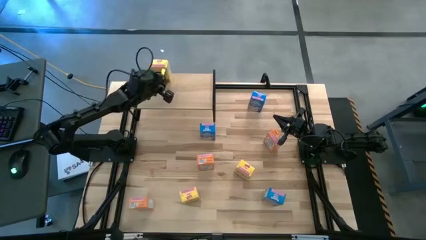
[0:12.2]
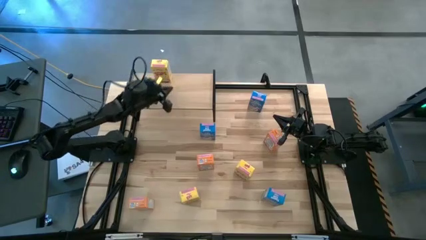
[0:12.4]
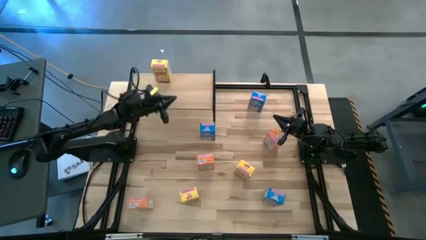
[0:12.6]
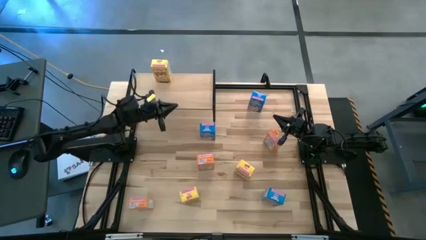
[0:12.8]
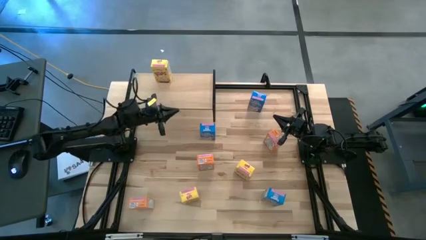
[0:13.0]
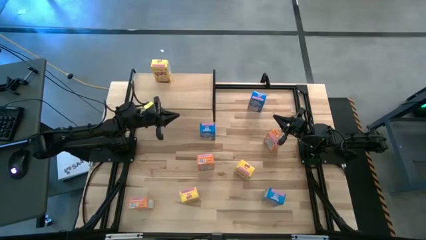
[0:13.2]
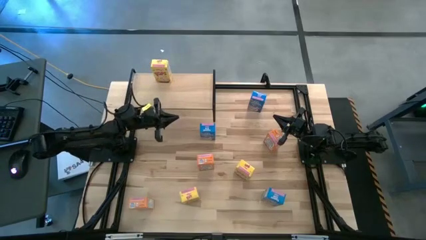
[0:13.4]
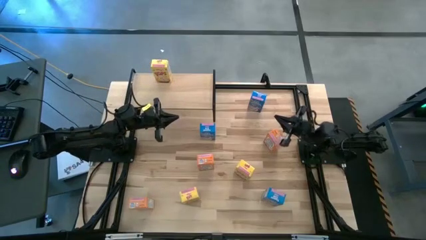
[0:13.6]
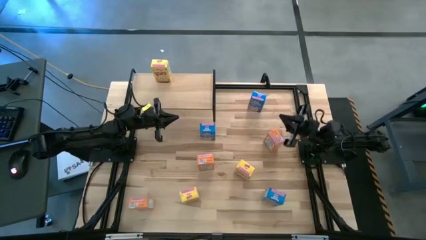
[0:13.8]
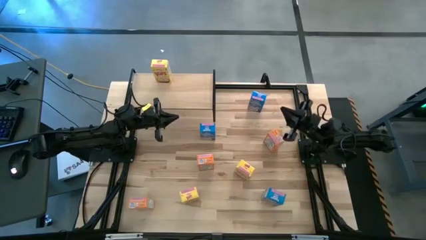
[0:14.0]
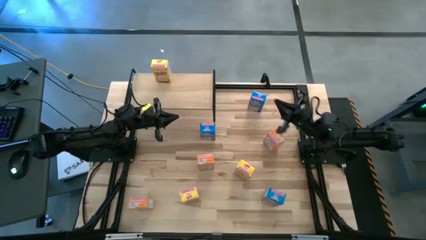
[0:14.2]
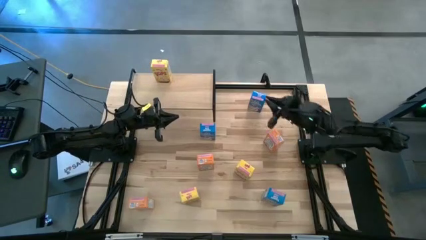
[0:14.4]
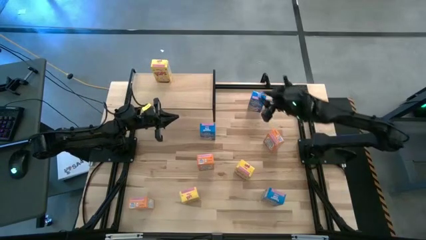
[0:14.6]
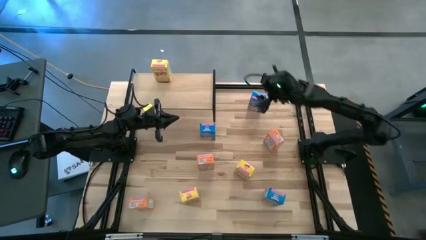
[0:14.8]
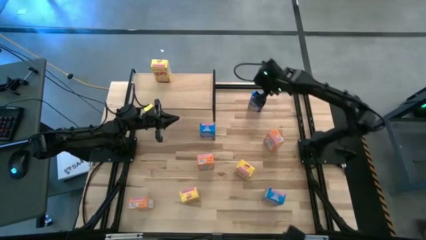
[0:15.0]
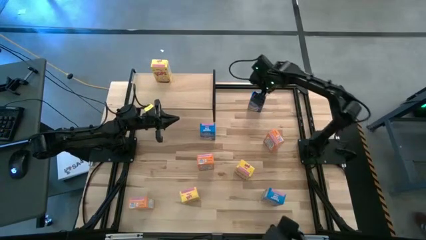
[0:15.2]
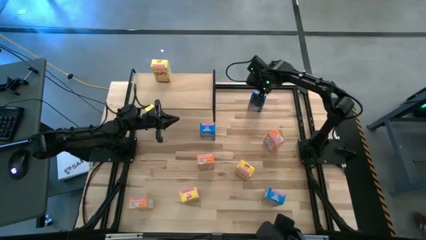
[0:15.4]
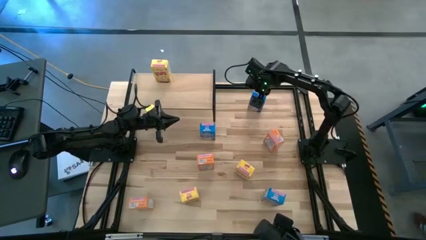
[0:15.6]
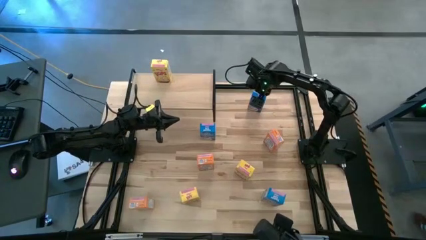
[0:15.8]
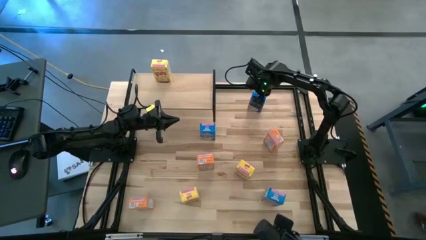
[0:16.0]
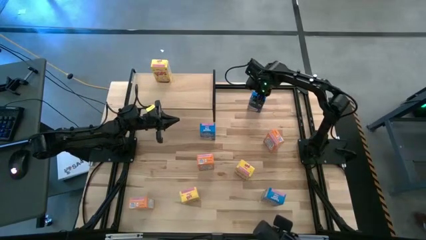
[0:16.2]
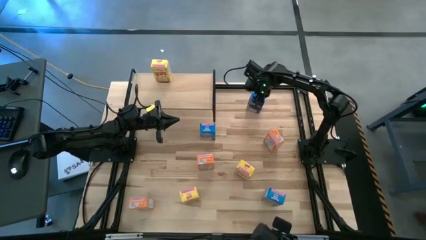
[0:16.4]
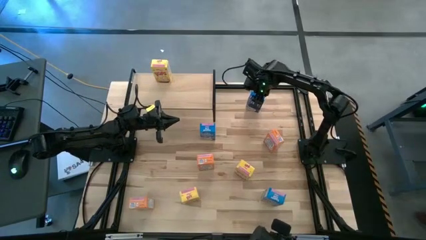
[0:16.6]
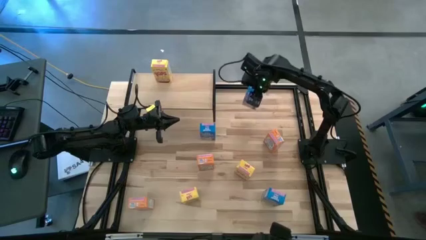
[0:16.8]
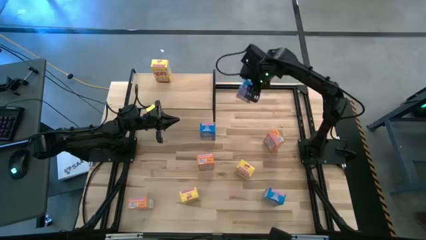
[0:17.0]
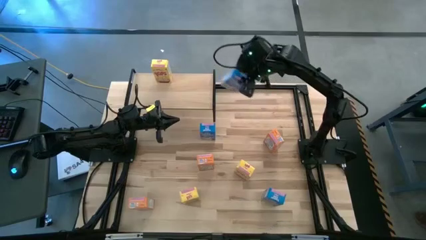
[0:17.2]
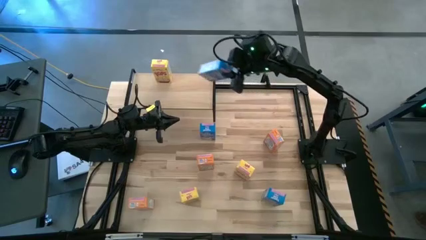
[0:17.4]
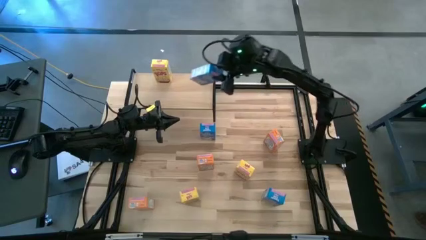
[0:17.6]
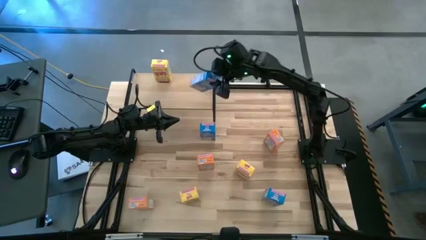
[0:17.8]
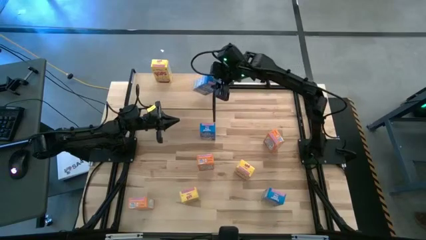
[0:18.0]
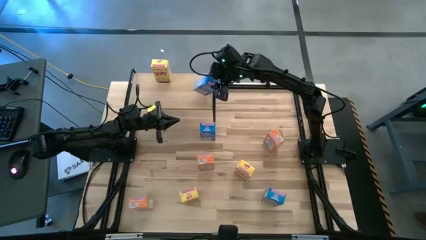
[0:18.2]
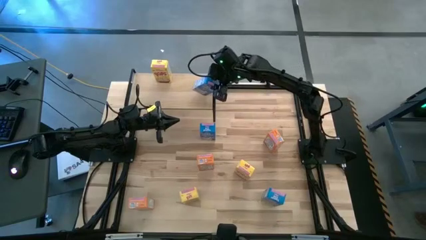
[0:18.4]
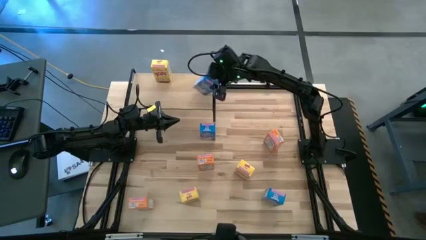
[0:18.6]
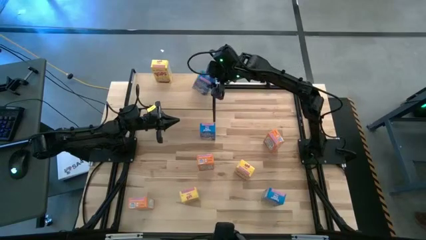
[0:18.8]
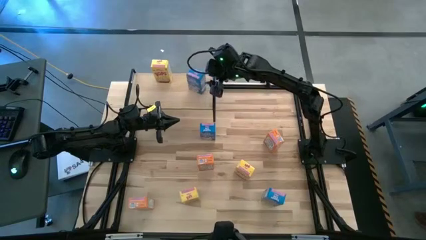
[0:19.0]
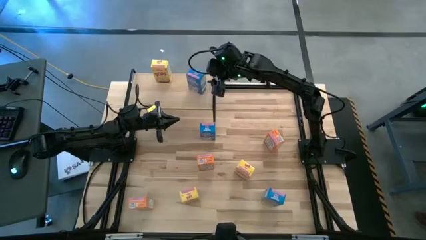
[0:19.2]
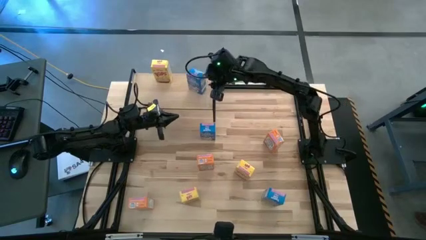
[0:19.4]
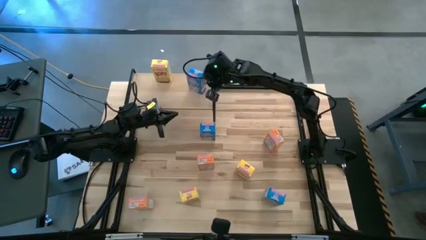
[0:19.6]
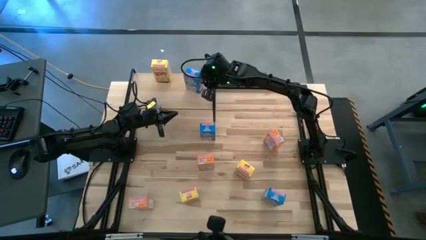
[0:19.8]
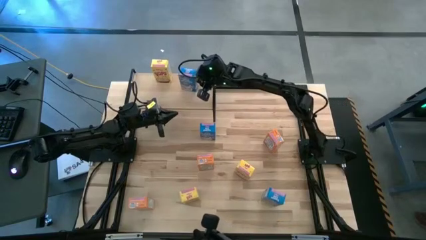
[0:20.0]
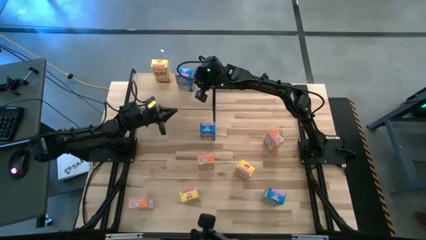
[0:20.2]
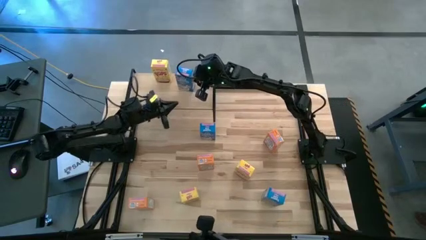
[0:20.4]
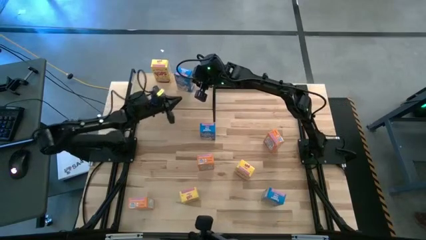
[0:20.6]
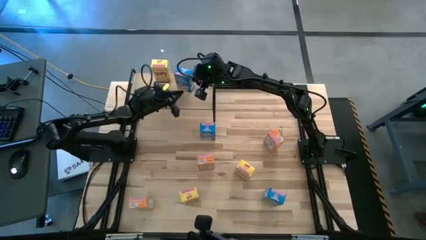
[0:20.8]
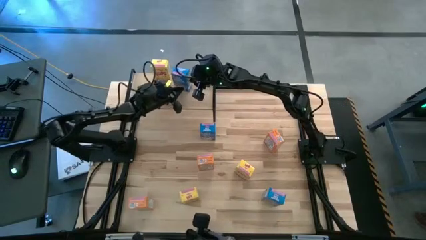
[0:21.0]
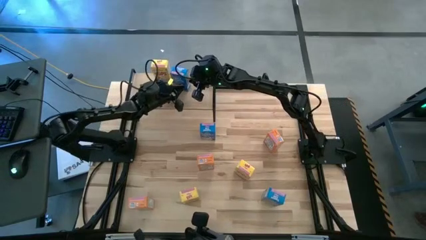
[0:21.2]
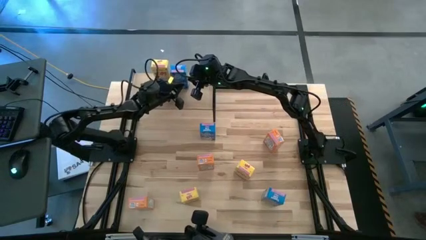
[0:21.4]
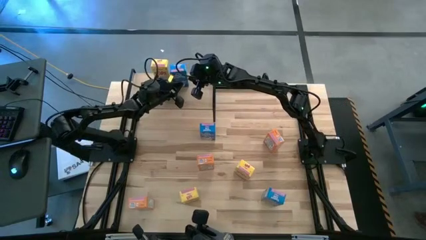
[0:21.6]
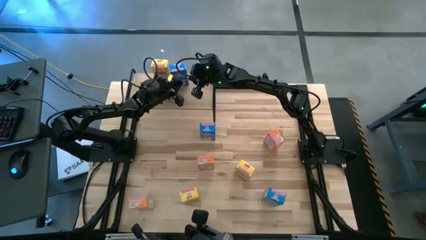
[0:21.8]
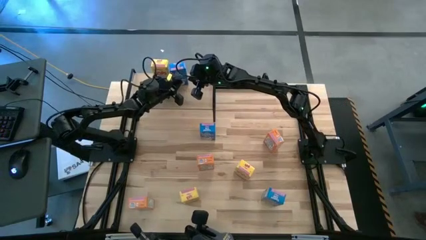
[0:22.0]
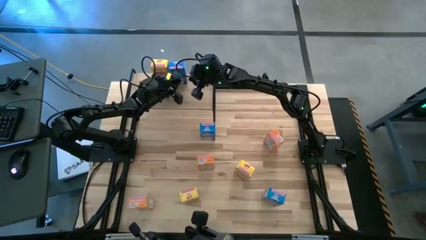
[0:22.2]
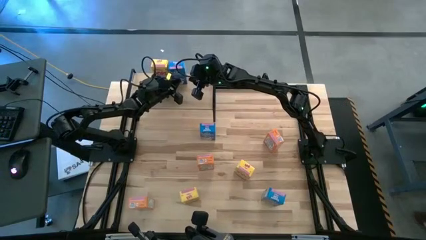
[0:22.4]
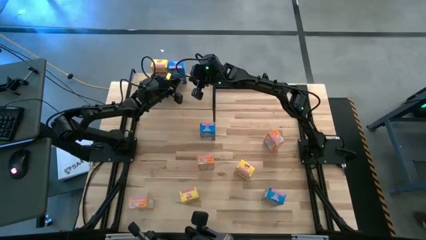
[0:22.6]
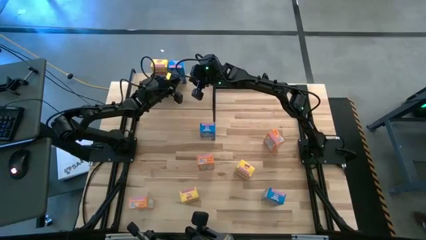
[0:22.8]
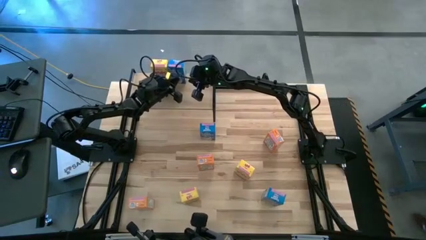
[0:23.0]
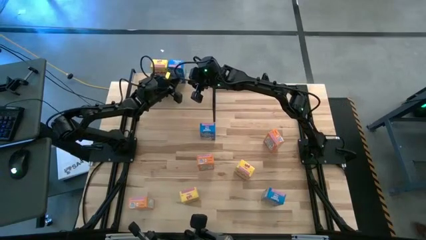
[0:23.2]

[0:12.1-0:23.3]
Task: Stack cereal on shelf
Put the top blue cereal box on the shelf

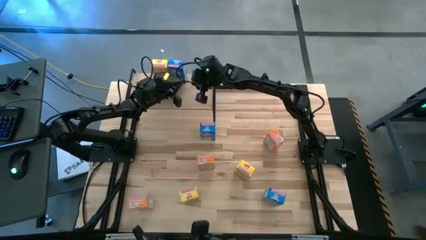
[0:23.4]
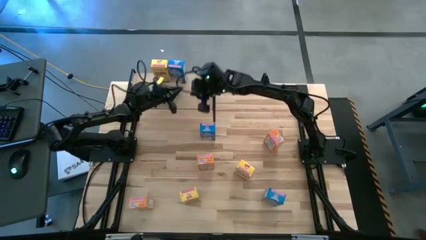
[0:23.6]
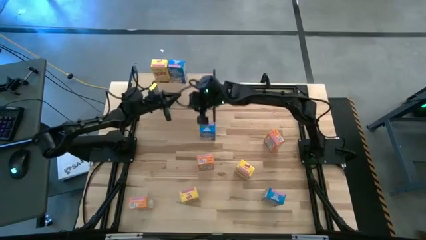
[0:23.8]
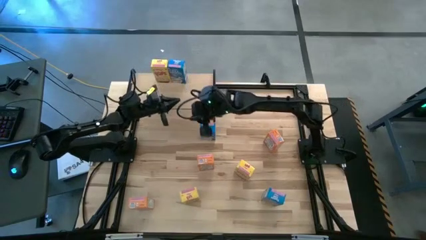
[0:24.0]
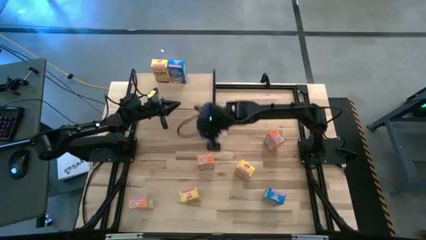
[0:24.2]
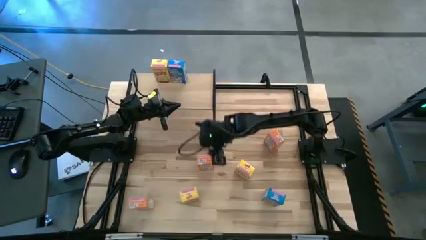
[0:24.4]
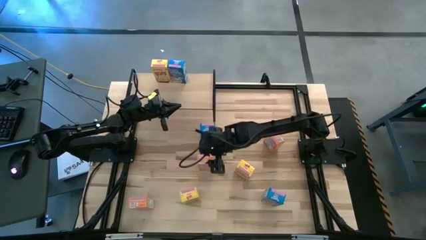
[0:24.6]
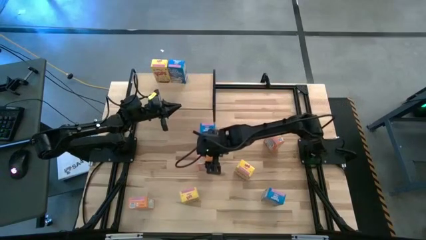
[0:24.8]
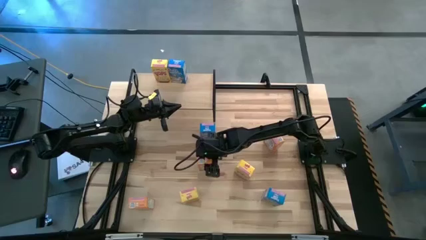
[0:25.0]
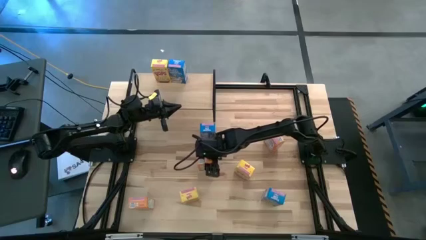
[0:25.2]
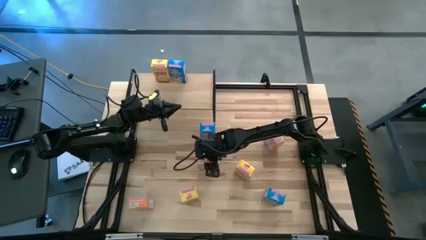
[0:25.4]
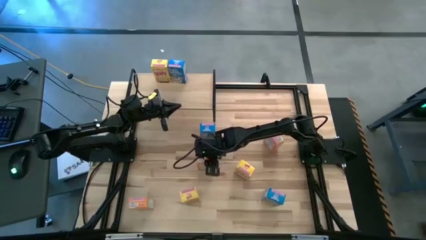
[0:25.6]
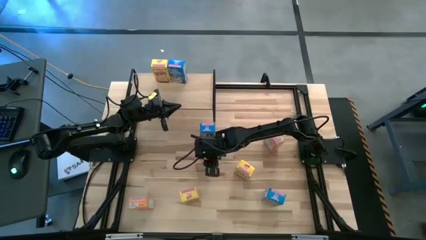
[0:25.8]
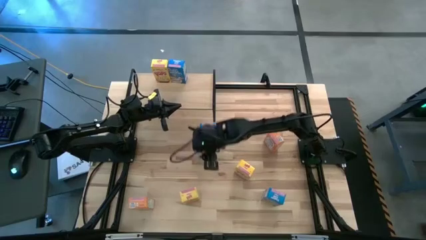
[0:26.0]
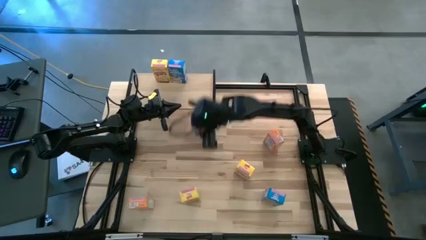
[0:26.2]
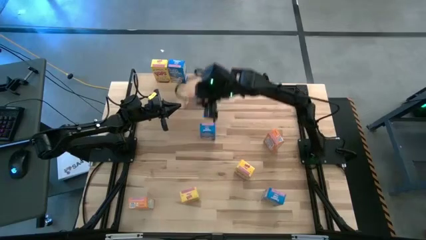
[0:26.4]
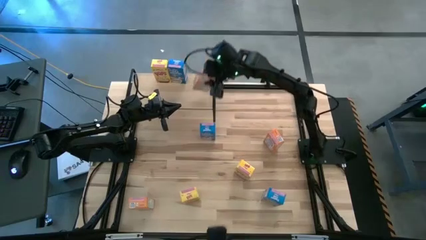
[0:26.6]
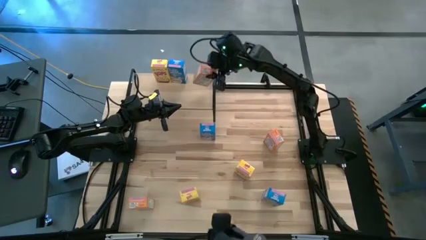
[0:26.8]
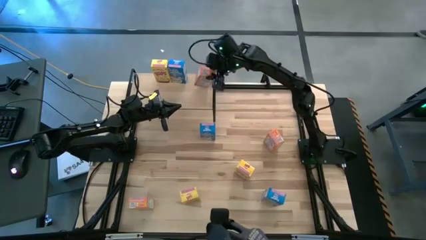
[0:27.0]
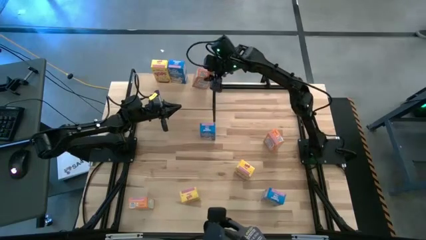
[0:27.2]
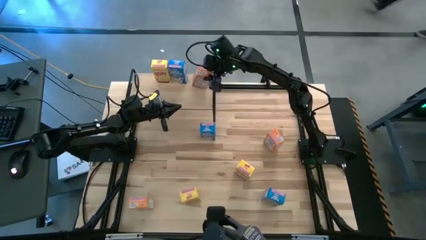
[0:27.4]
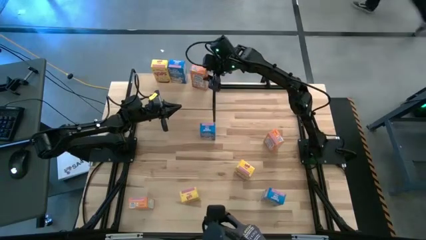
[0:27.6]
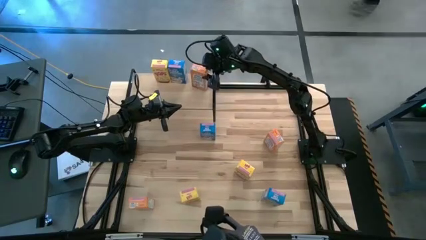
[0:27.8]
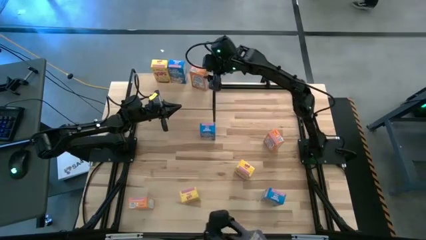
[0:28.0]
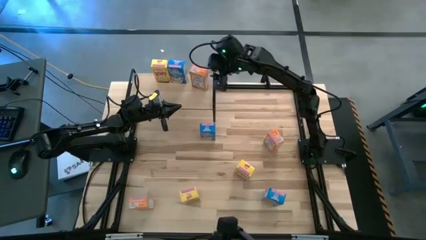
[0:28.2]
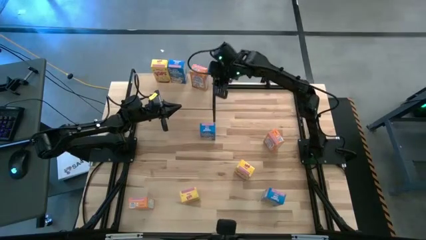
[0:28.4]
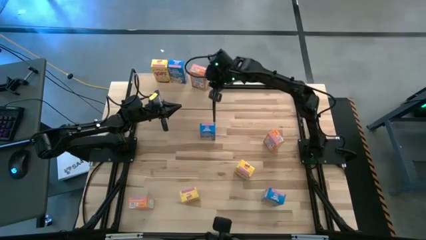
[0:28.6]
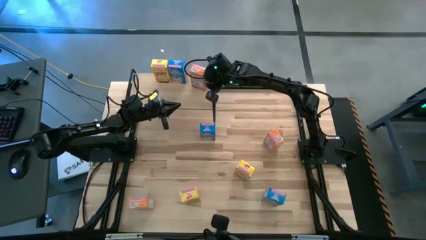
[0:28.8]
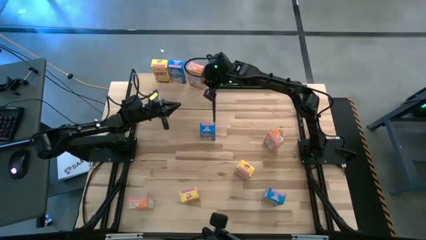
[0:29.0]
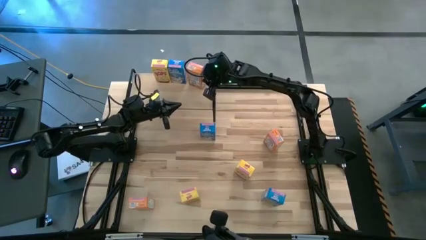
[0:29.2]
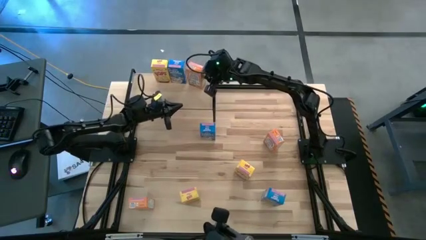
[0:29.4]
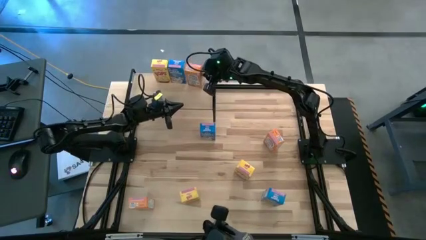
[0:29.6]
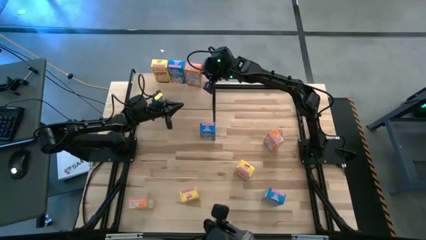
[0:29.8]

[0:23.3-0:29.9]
Put the middle orange cereal box on the shelf
